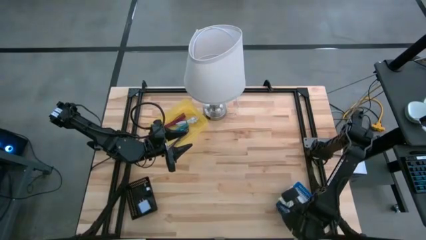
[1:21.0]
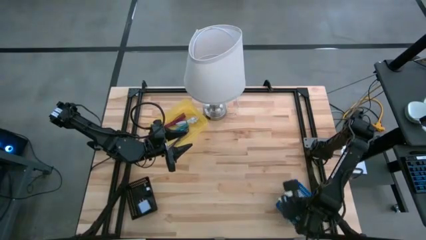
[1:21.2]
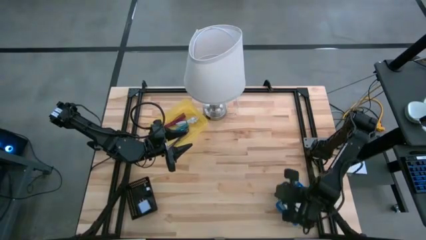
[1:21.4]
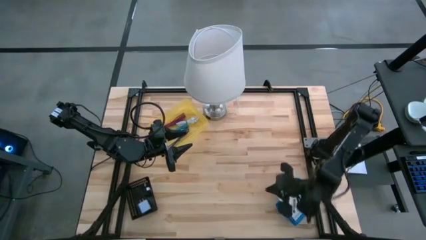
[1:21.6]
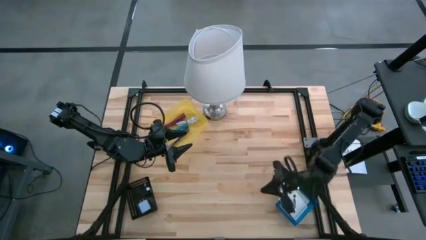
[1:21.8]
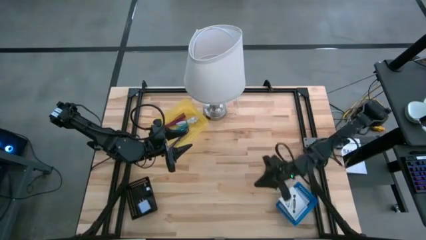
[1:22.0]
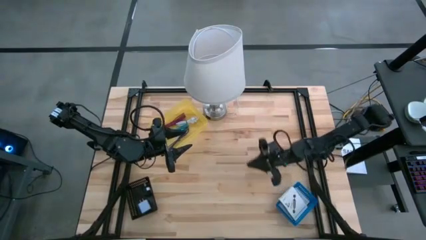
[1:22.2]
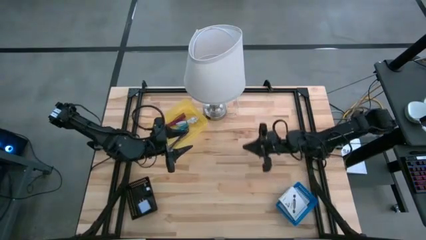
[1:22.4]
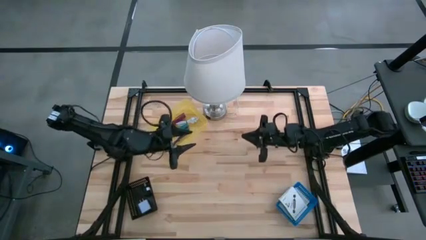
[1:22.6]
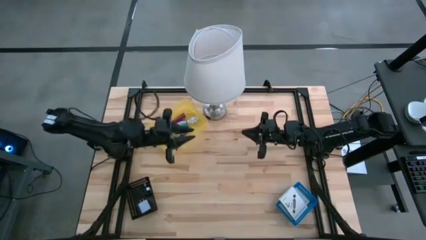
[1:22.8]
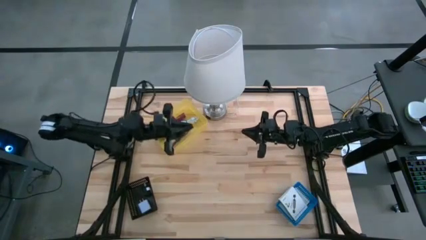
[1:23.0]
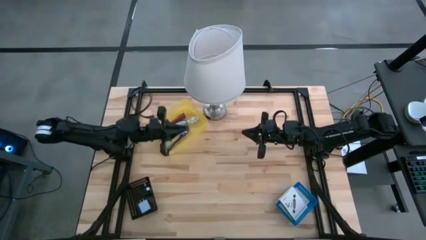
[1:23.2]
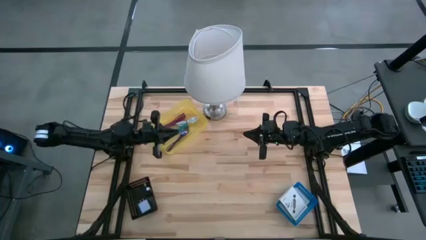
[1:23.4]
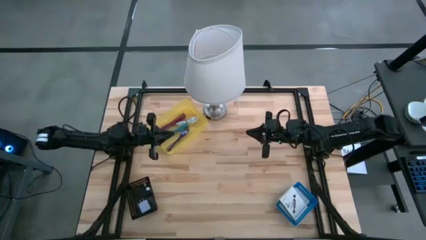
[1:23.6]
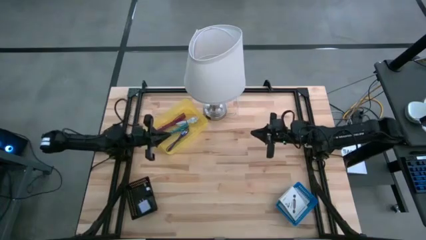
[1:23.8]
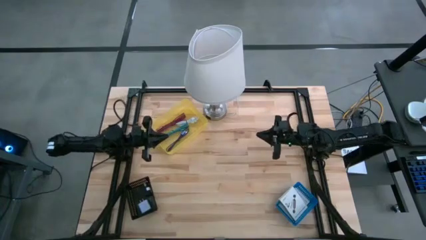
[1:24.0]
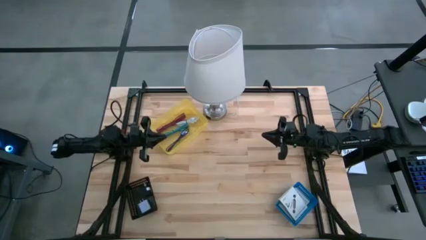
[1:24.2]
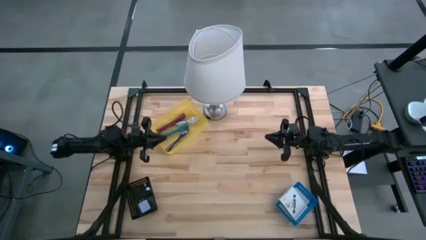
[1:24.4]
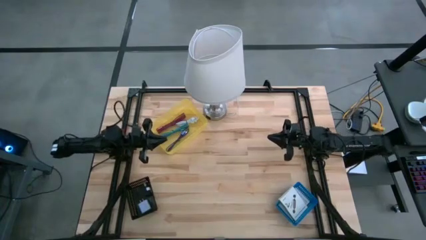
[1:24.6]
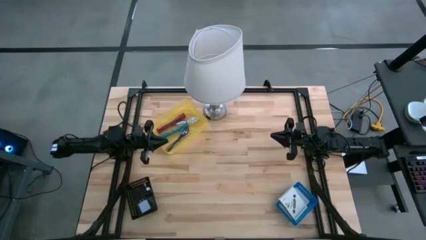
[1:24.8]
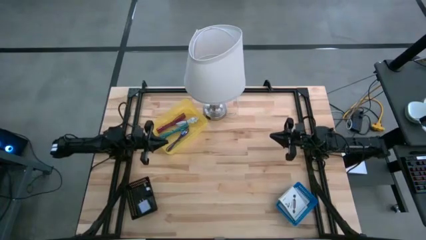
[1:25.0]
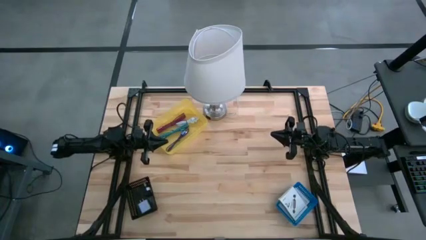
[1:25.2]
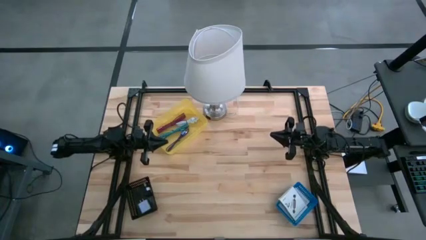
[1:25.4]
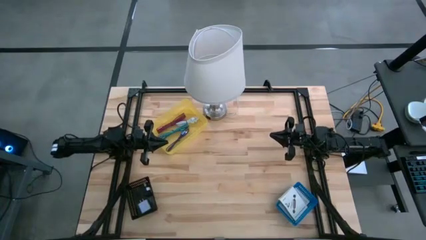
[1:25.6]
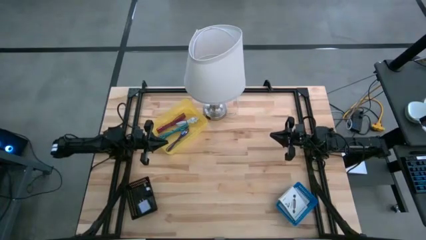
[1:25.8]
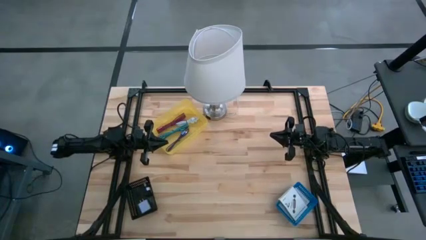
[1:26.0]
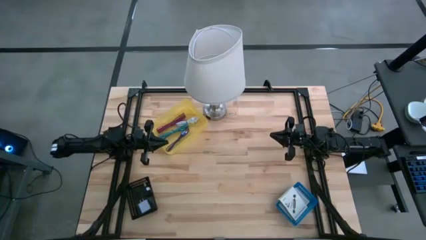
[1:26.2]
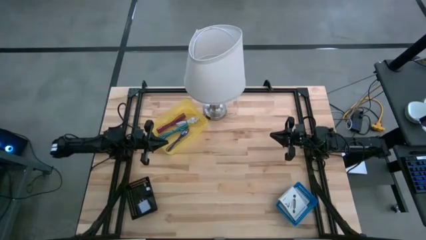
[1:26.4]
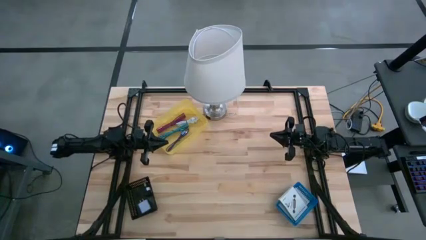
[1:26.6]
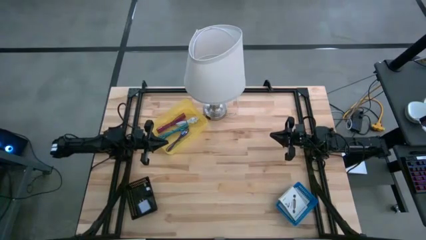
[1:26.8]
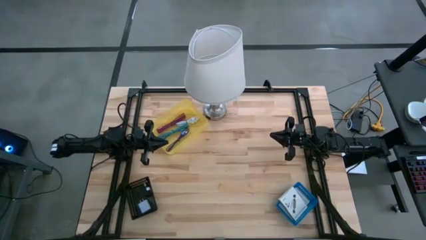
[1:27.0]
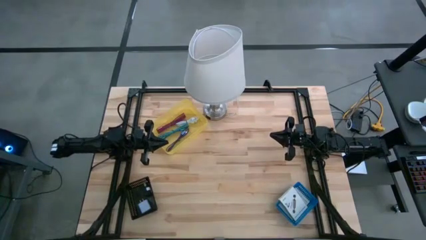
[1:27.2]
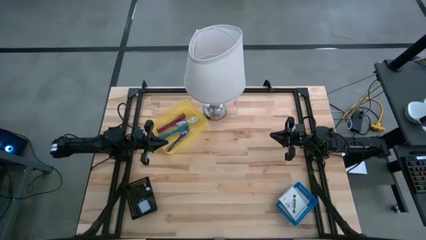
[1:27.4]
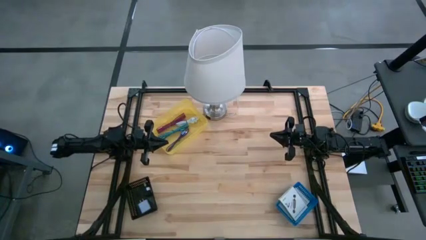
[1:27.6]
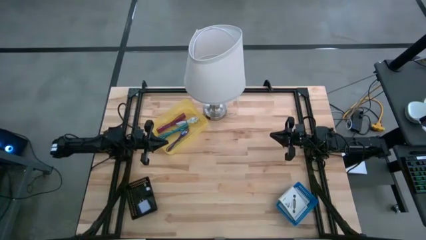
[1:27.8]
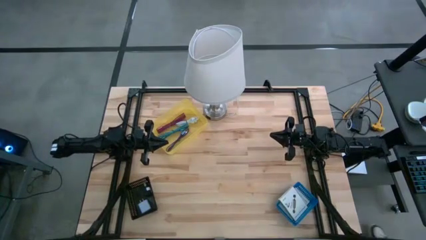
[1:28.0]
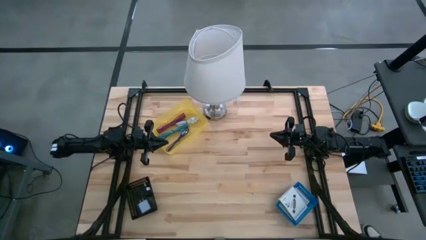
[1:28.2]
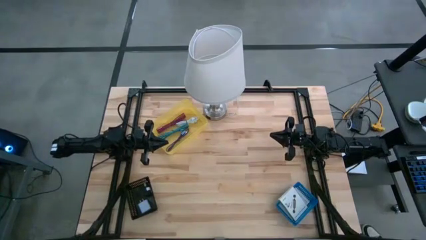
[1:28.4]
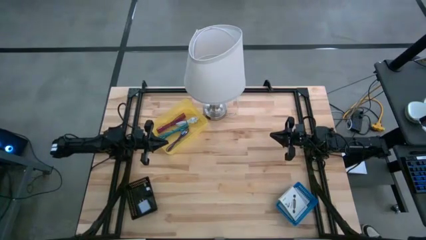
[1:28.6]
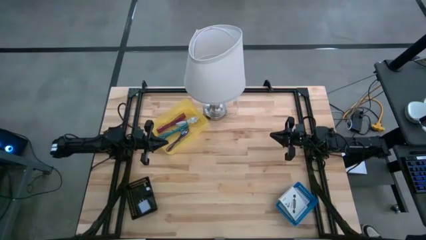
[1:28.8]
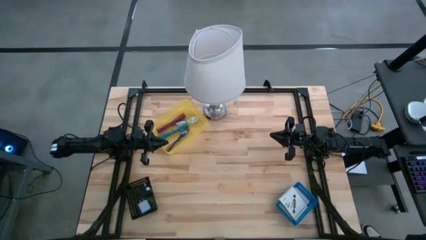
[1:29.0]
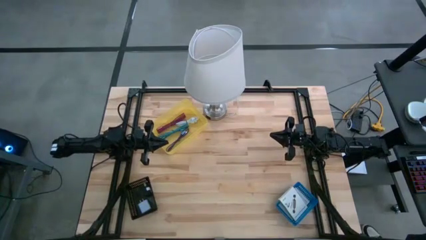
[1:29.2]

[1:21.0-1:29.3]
Task: Pick and place items into bin
Return to Home Position

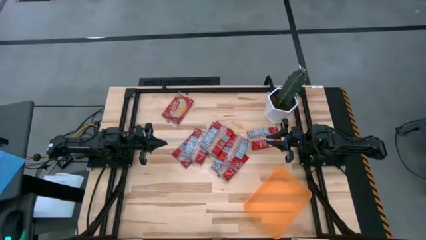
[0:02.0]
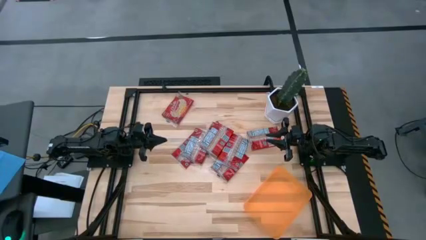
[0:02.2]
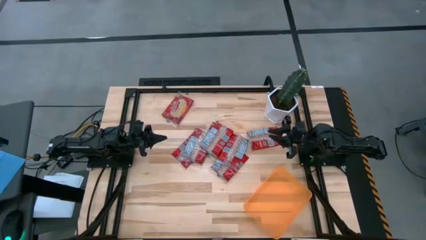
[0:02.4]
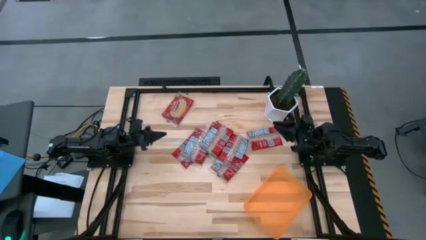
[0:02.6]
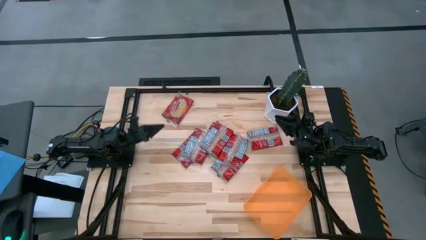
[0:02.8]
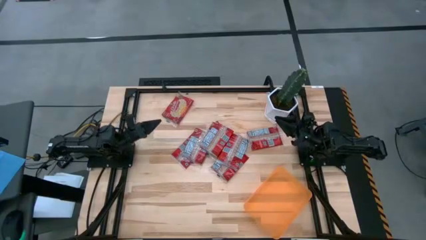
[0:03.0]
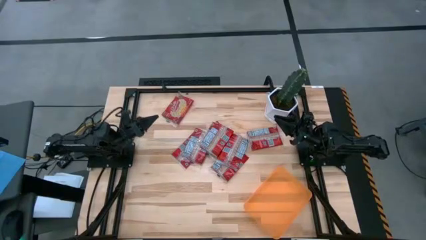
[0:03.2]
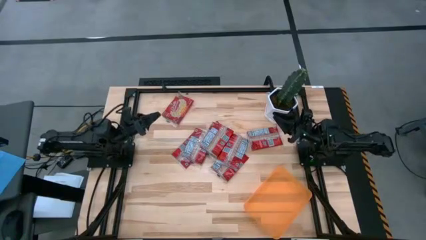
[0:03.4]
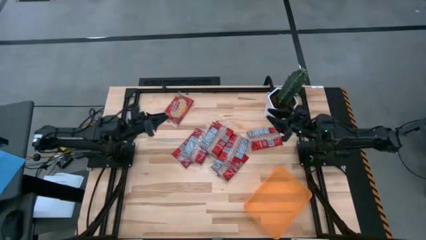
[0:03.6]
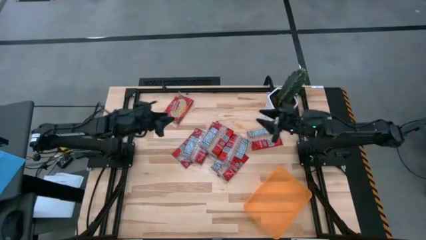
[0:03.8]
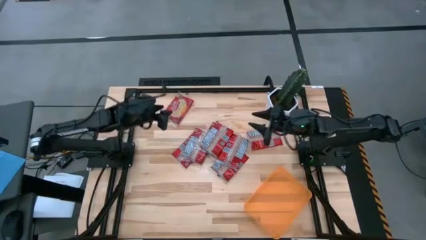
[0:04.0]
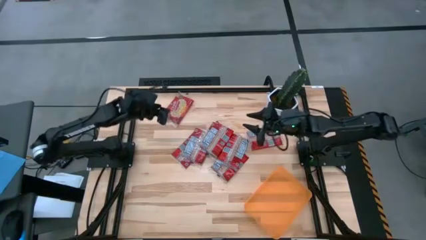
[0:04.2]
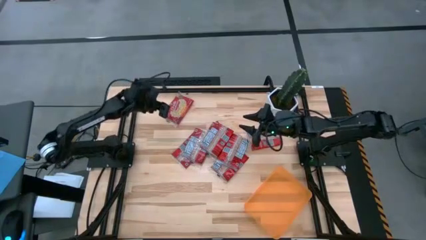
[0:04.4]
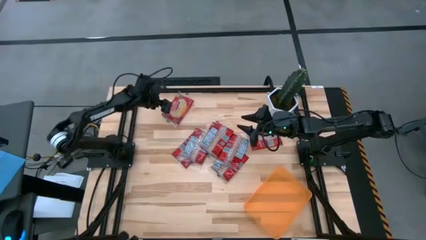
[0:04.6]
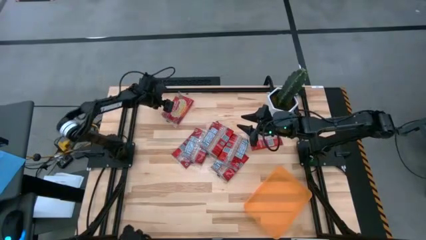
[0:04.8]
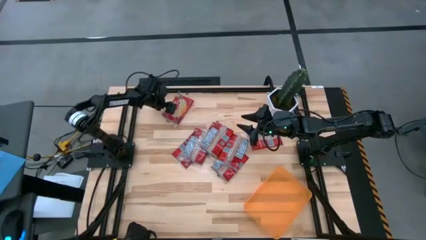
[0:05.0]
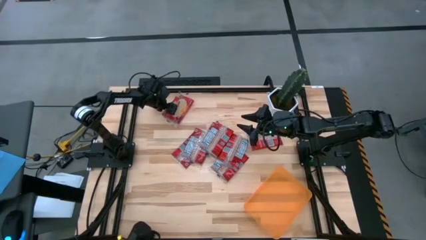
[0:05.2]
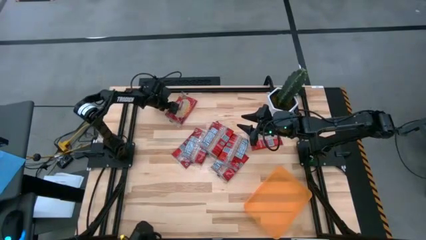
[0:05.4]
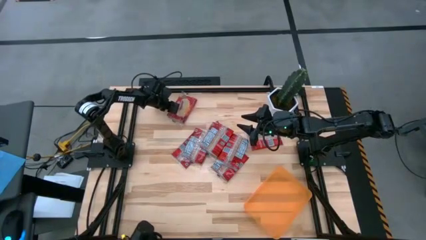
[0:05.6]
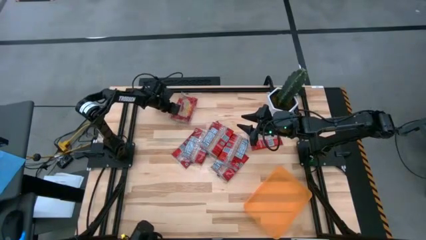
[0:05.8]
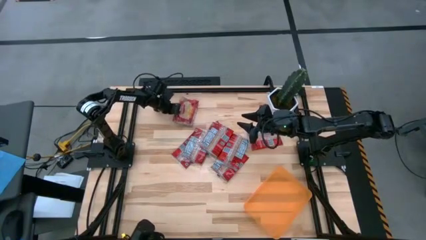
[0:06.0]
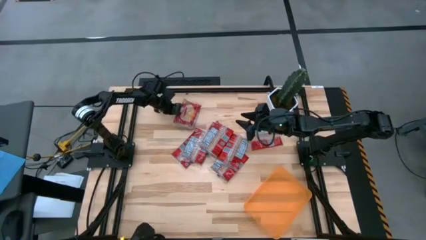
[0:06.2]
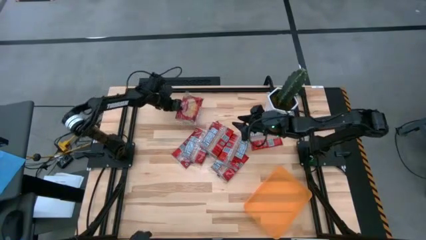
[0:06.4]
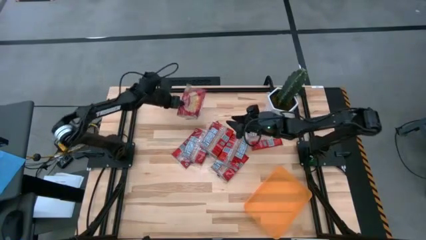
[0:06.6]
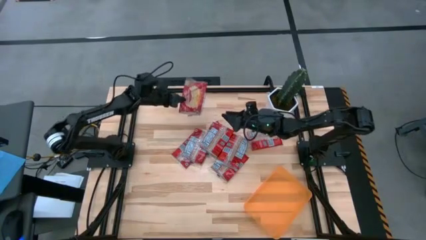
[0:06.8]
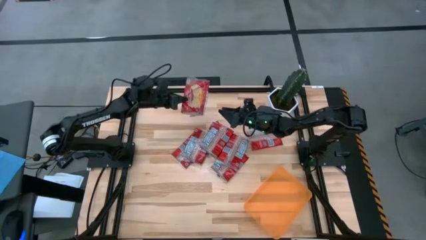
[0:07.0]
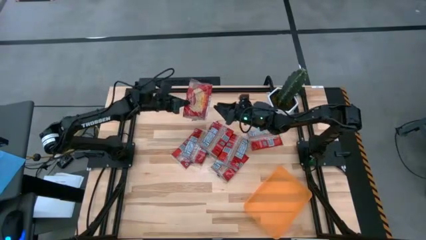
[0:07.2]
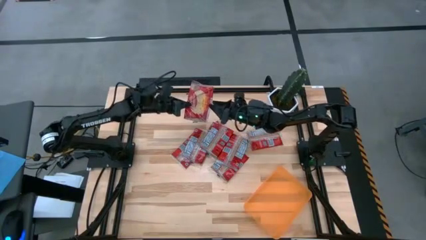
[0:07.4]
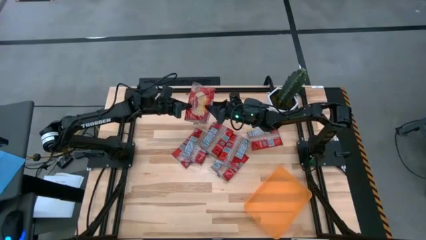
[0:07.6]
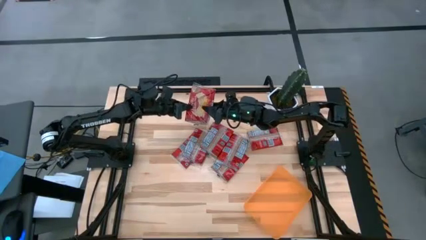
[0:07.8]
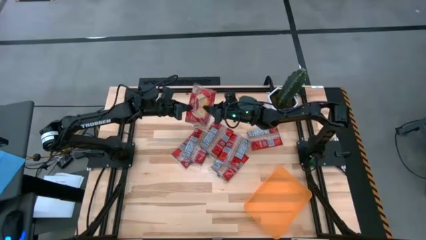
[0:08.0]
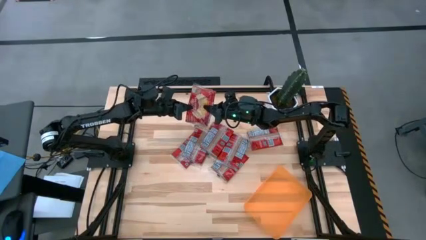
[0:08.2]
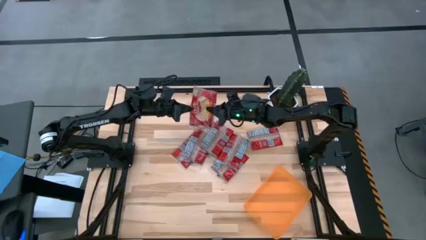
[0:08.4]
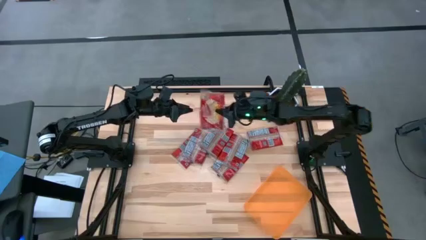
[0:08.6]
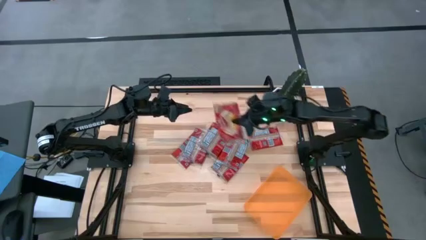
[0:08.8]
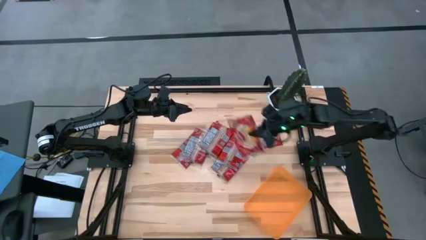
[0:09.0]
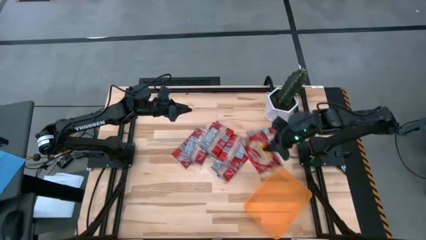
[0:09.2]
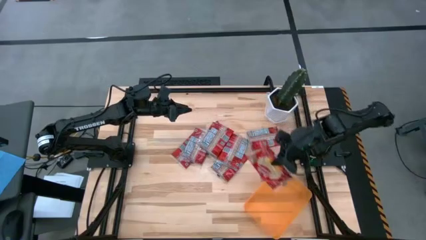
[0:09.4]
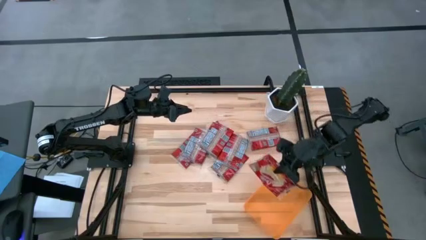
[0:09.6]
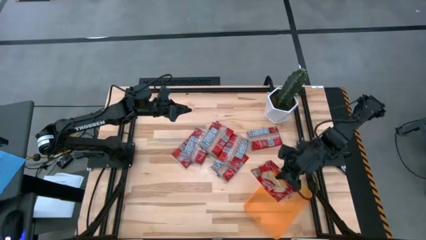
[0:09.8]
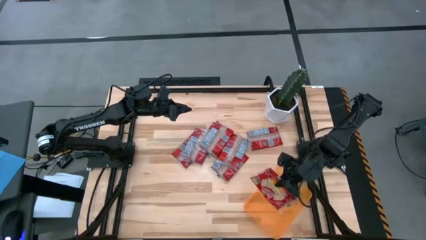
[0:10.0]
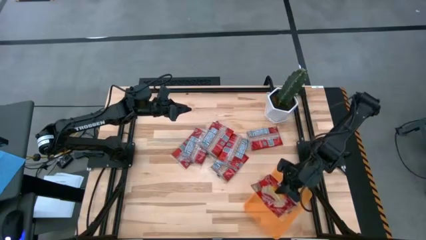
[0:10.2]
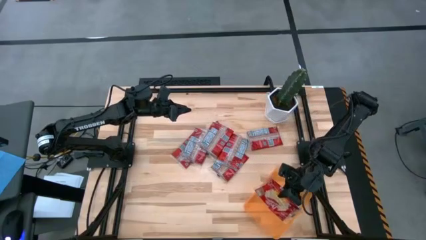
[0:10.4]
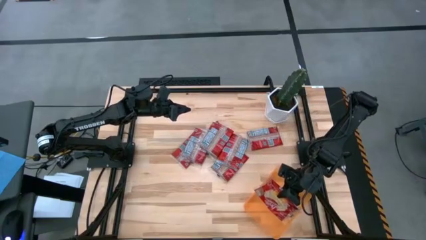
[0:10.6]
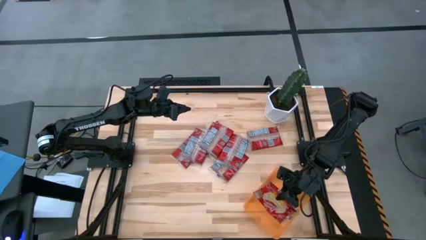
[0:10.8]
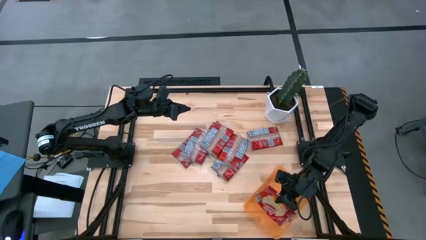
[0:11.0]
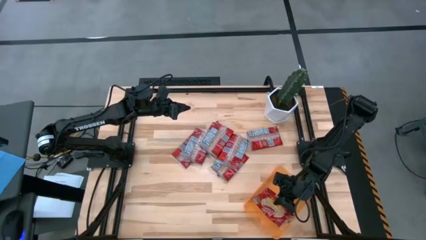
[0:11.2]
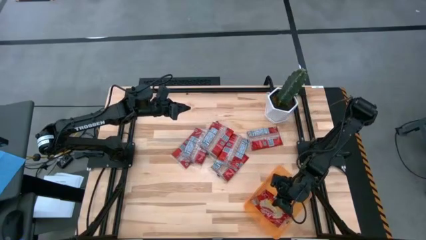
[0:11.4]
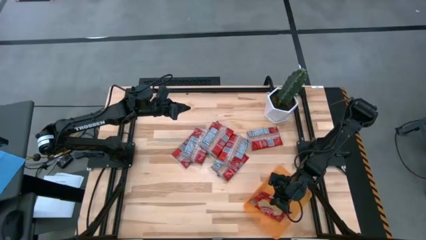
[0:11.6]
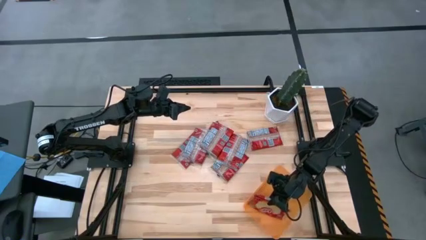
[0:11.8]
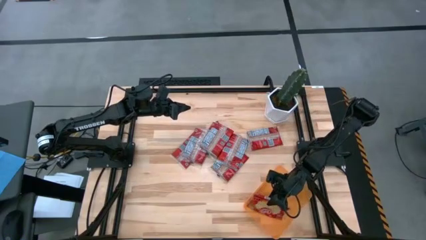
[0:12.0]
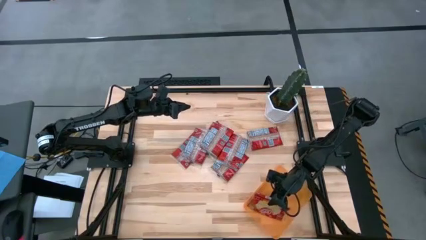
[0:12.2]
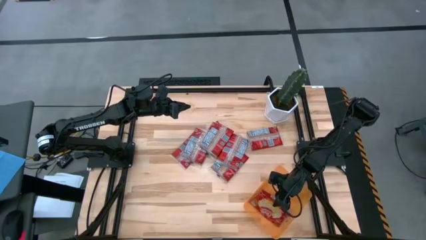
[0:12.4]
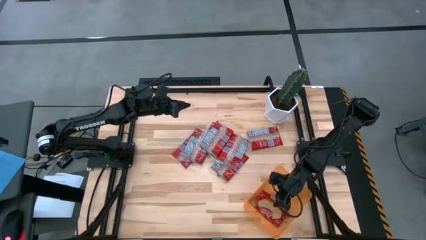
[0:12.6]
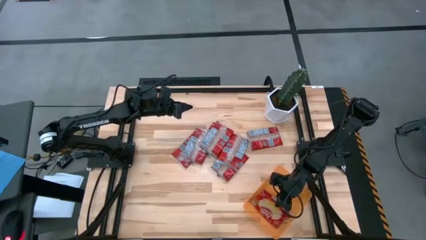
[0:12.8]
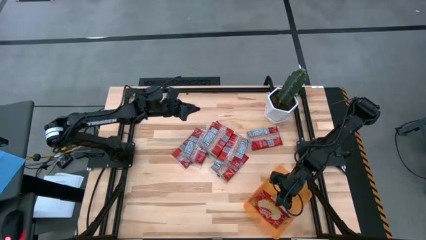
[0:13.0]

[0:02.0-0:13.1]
Task: Sort popcorn bags into baskets
Put the red popcorn bag into the orange bin
